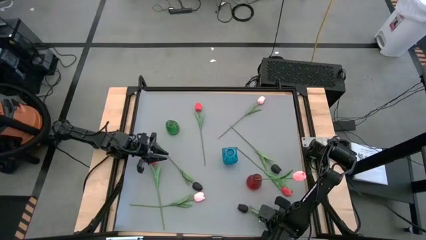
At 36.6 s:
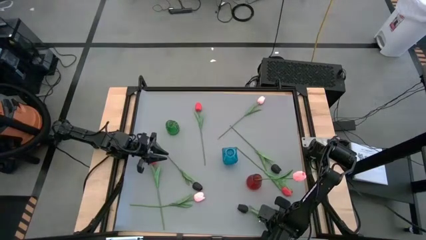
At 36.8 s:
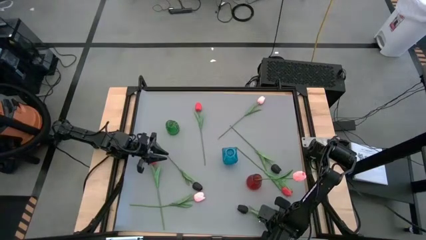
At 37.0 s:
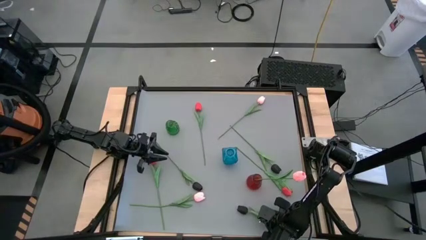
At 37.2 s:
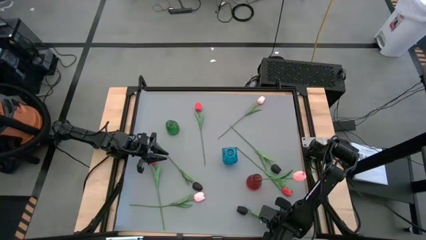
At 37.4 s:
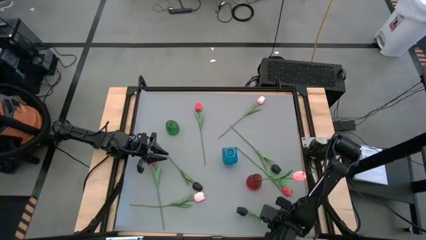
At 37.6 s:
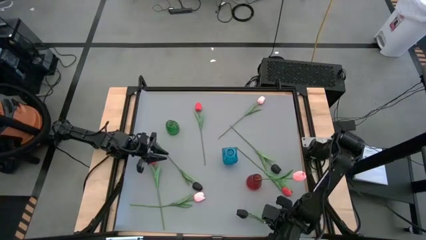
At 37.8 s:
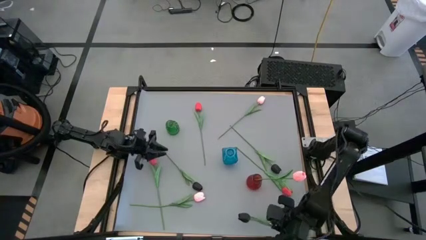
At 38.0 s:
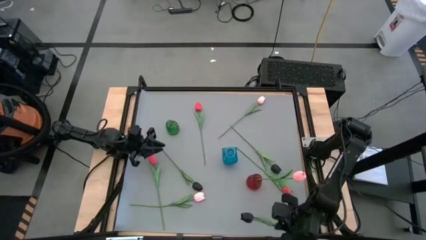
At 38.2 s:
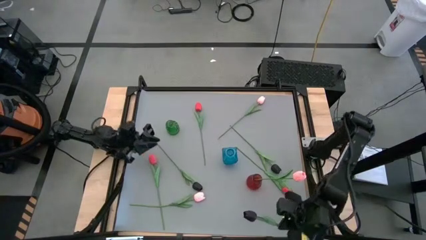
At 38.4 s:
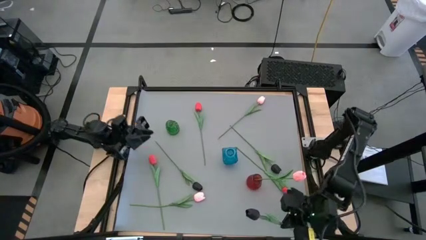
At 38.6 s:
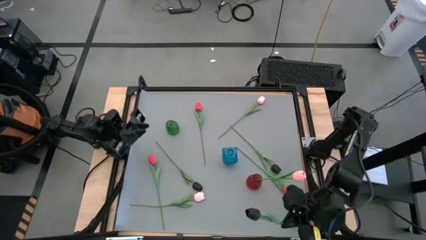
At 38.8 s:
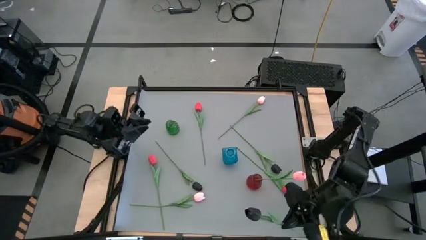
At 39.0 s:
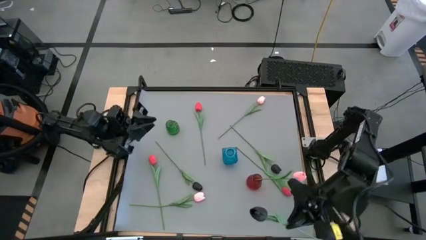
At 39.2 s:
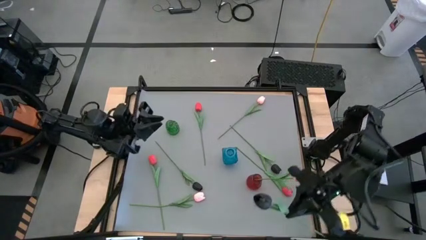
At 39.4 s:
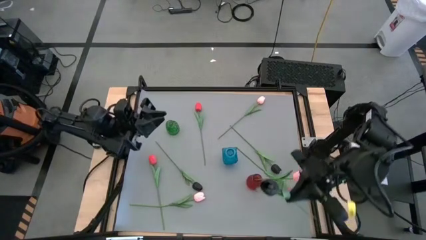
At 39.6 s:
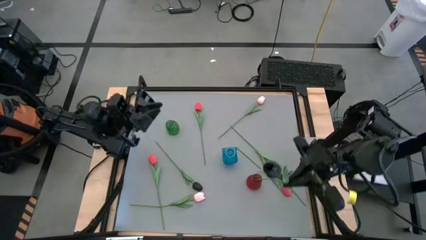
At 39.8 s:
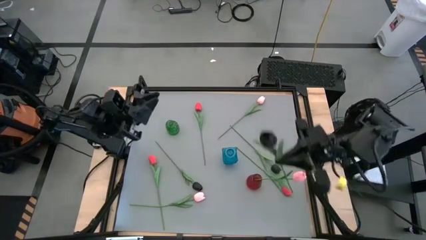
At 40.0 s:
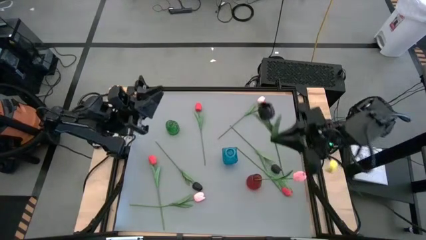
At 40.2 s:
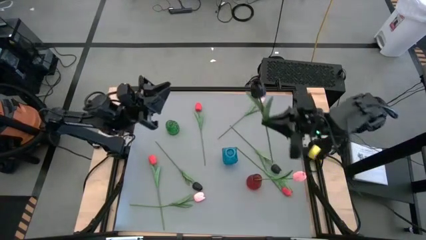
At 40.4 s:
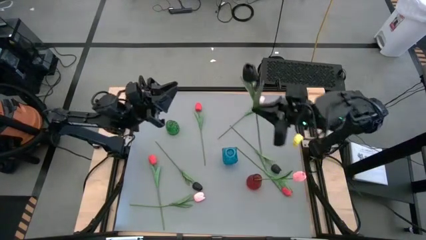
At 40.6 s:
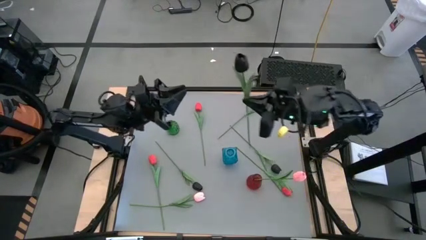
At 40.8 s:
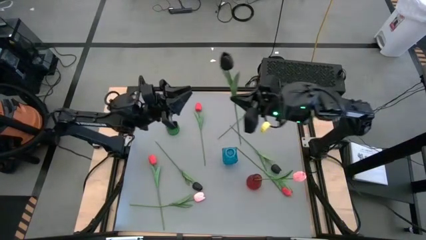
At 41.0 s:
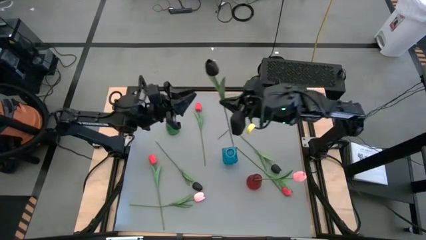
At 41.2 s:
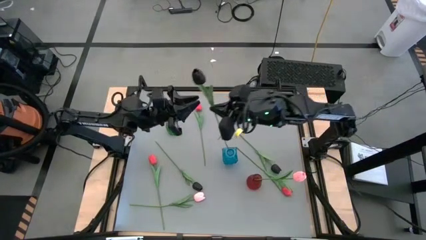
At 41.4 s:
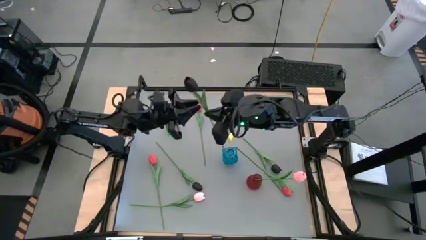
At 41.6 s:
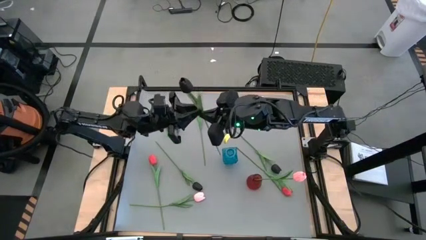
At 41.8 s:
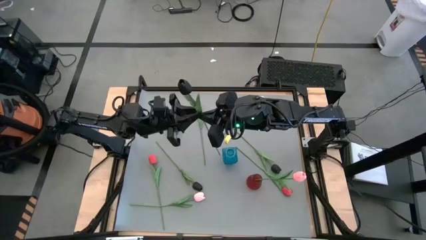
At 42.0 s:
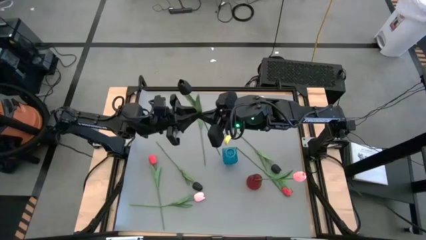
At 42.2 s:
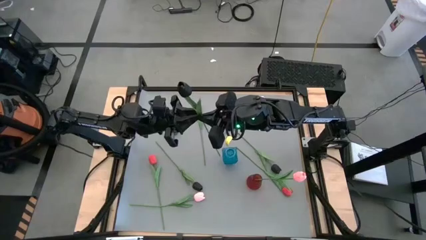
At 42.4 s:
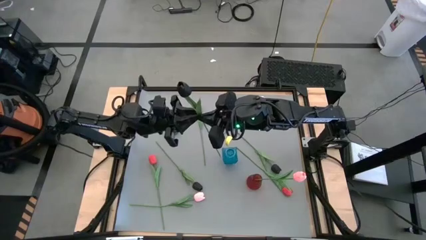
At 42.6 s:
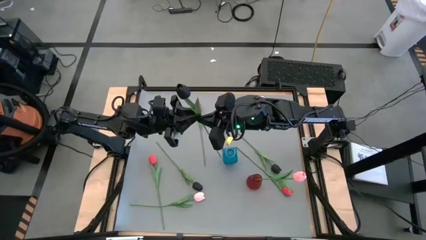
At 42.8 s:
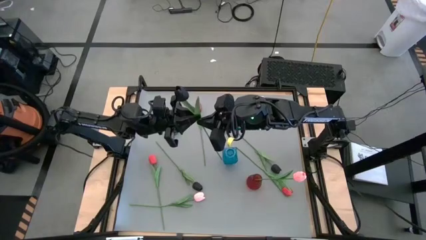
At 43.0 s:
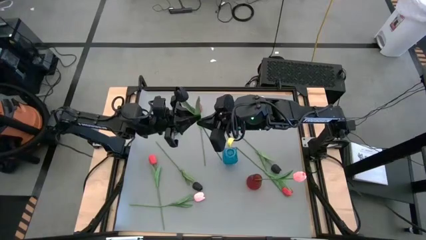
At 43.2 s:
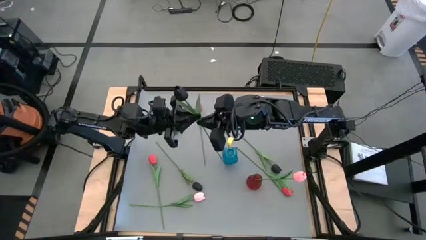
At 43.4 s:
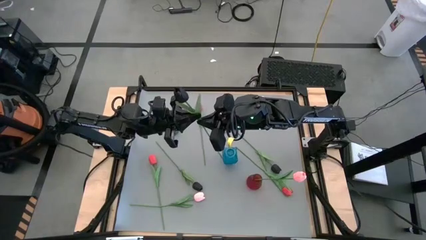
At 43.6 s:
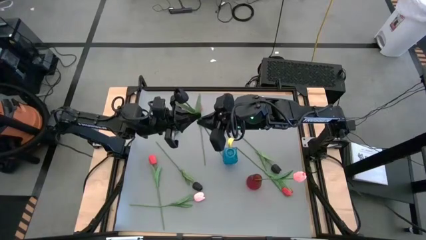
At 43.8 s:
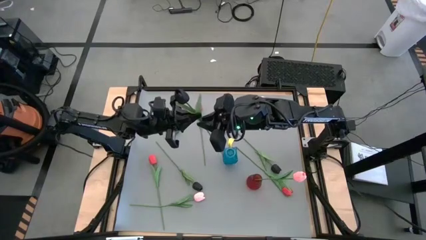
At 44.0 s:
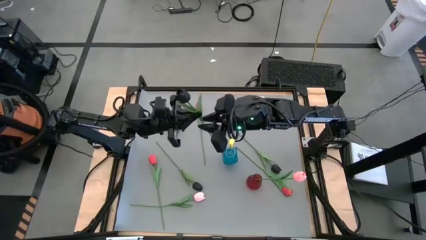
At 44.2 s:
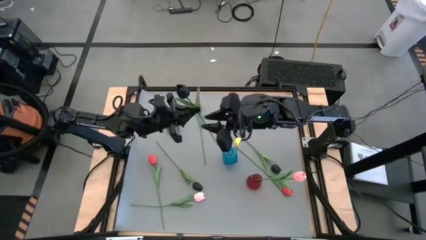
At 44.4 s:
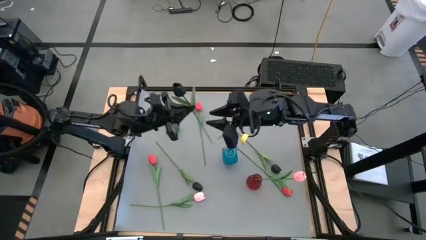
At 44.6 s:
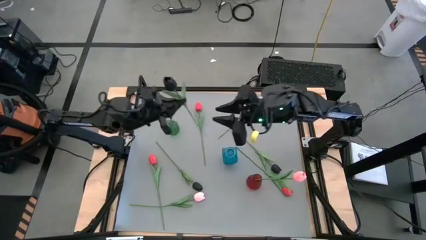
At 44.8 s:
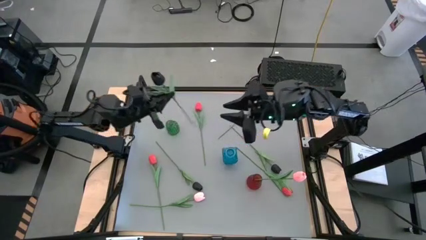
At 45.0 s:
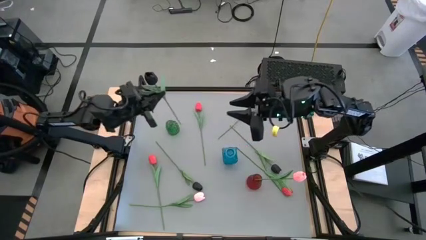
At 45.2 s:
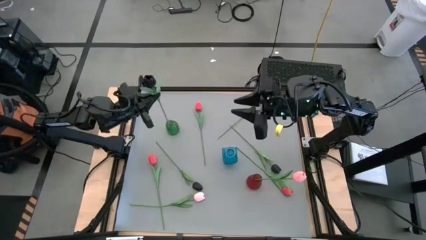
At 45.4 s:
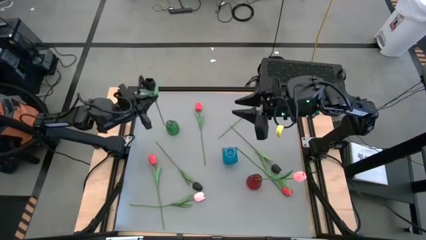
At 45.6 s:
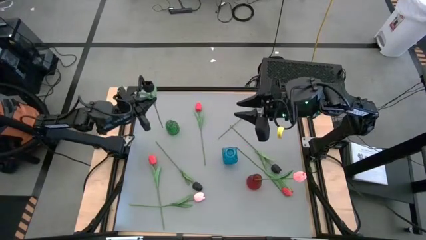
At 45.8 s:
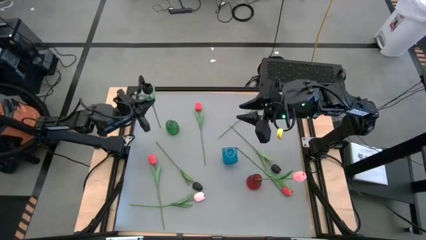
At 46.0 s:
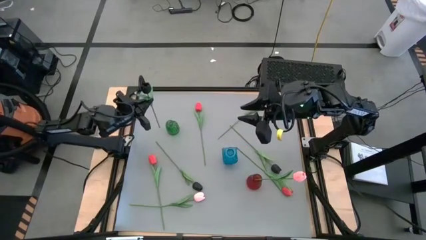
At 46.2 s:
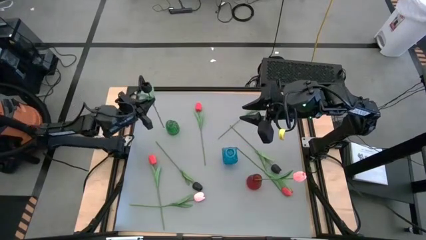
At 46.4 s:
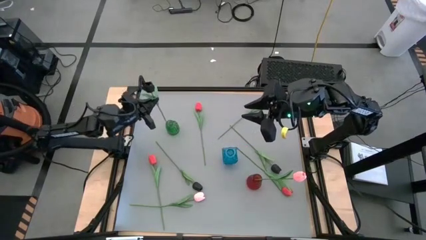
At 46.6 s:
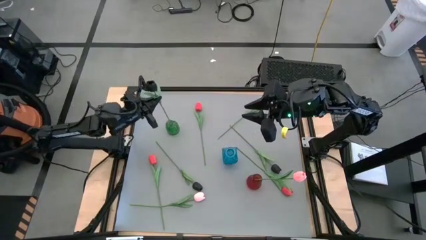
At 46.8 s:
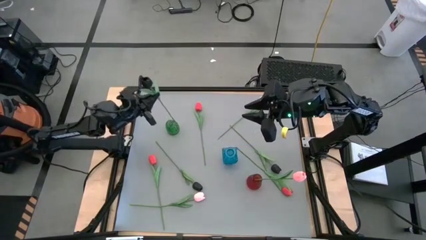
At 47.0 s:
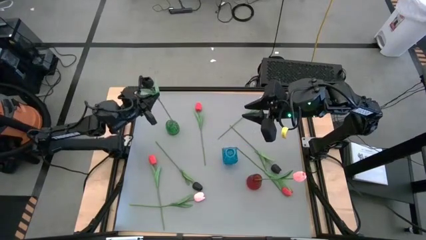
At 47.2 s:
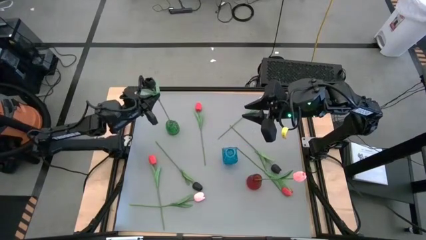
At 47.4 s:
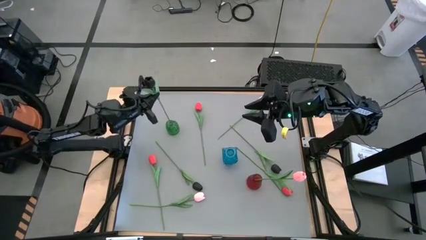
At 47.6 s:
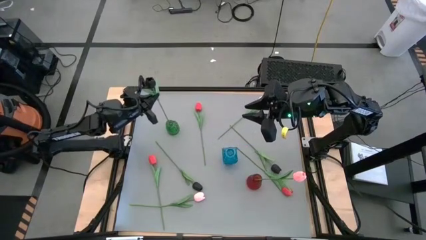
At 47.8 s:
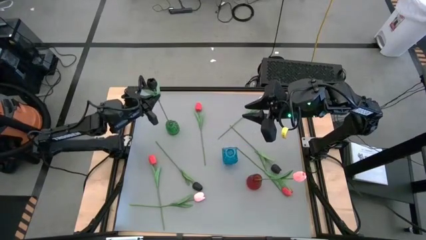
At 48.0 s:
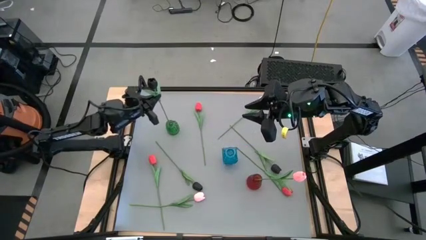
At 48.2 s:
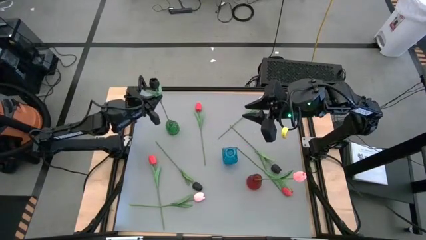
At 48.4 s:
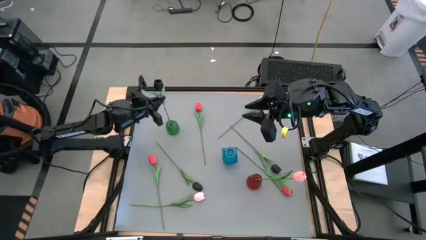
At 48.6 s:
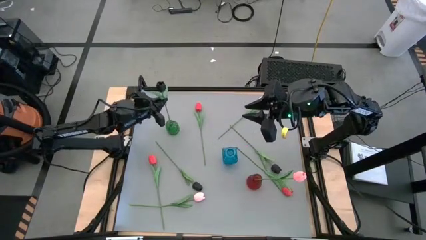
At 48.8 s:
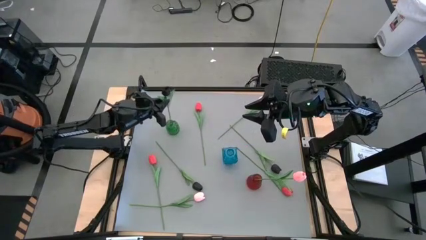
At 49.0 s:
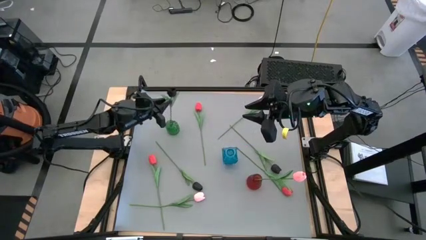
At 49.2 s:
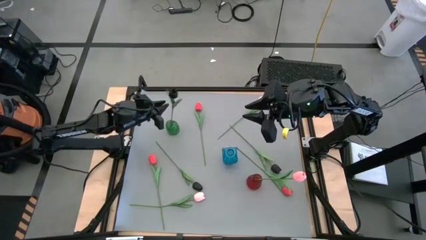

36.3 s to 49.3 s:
Task: Sort flowers into vase by color
Put the bottom black tulip into the green vase
